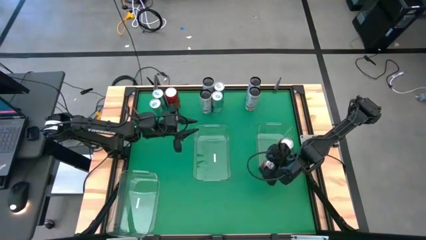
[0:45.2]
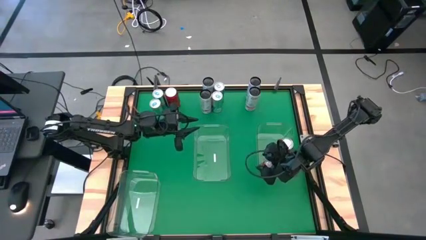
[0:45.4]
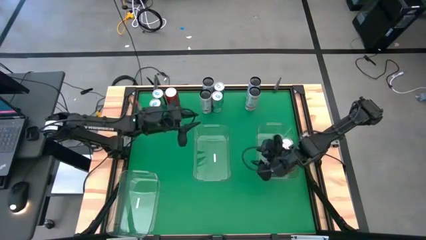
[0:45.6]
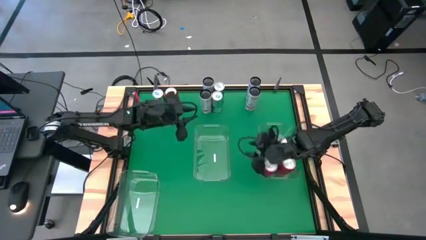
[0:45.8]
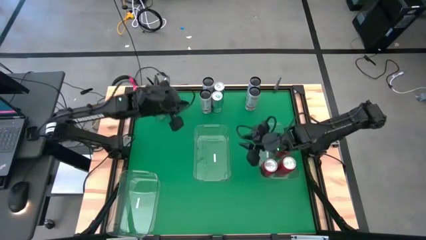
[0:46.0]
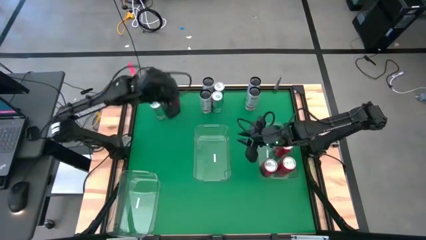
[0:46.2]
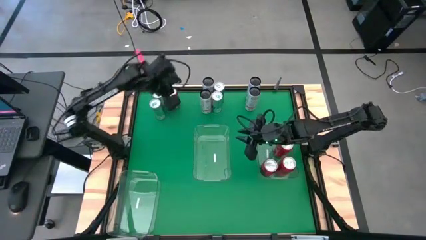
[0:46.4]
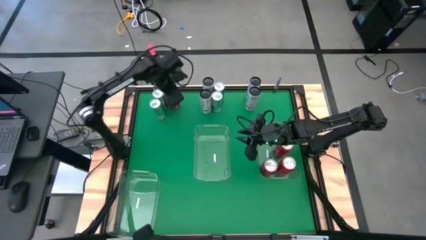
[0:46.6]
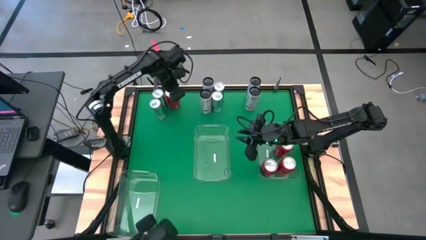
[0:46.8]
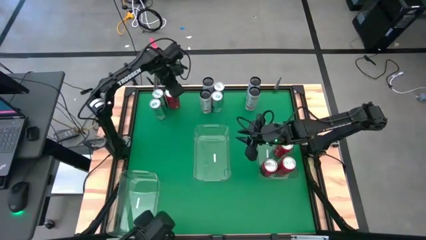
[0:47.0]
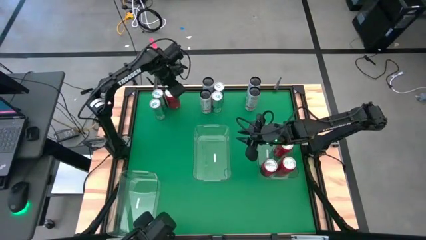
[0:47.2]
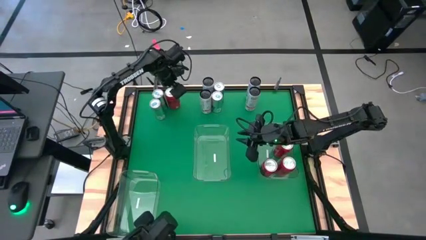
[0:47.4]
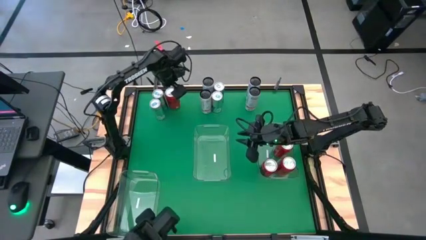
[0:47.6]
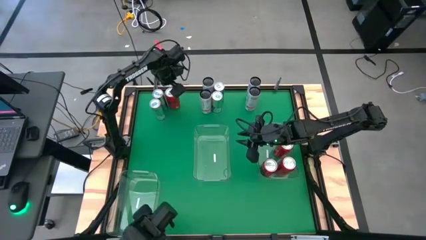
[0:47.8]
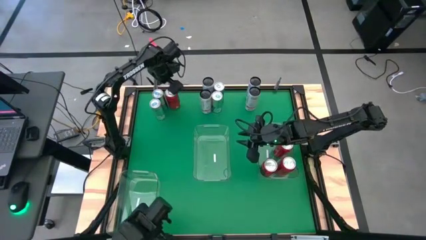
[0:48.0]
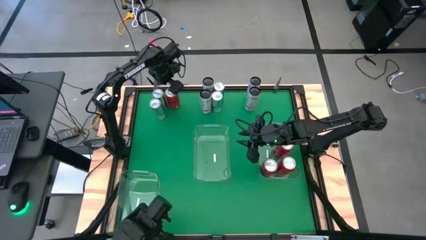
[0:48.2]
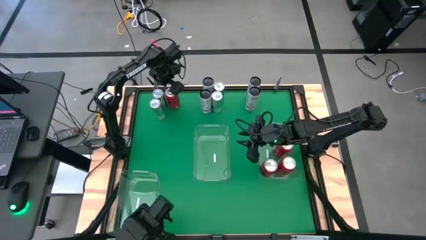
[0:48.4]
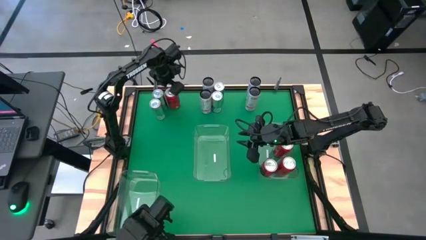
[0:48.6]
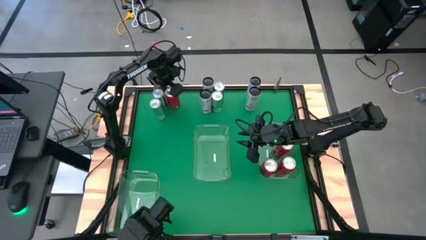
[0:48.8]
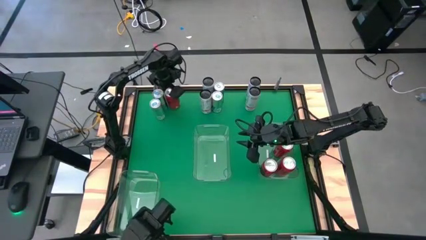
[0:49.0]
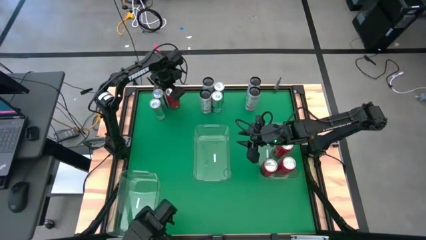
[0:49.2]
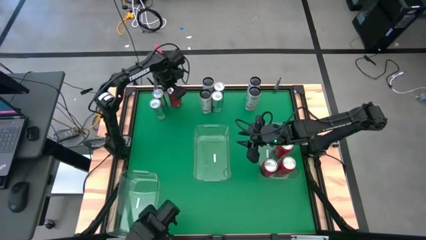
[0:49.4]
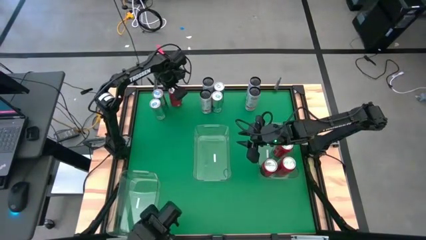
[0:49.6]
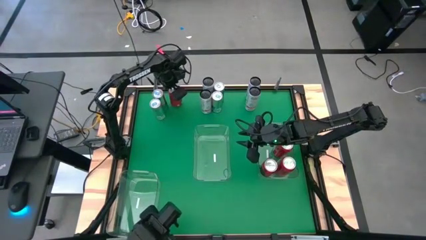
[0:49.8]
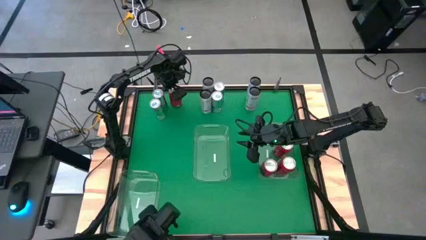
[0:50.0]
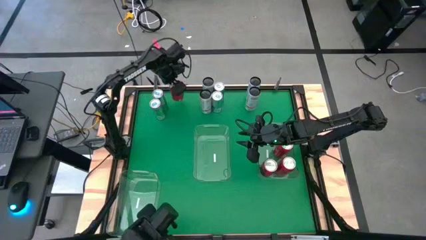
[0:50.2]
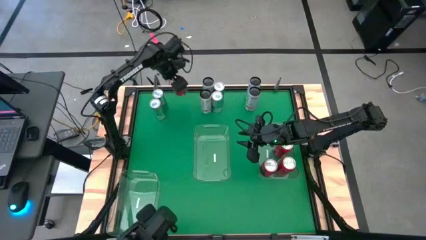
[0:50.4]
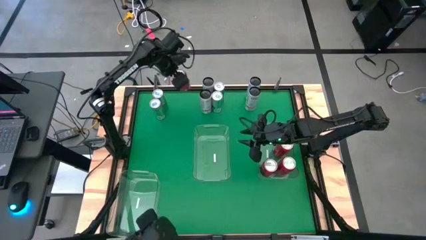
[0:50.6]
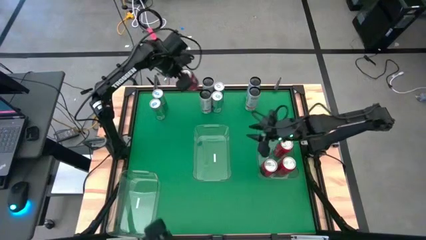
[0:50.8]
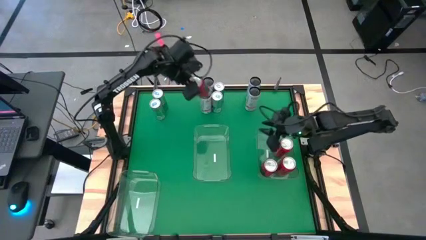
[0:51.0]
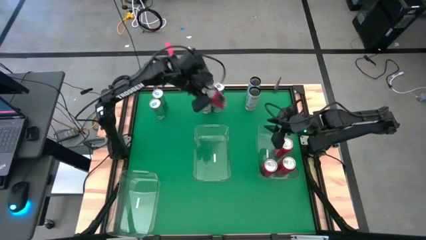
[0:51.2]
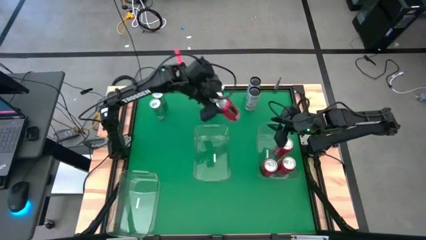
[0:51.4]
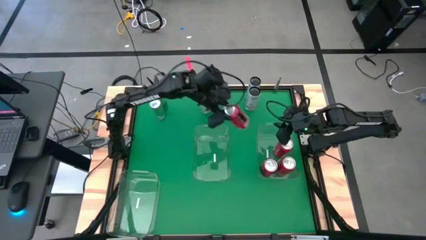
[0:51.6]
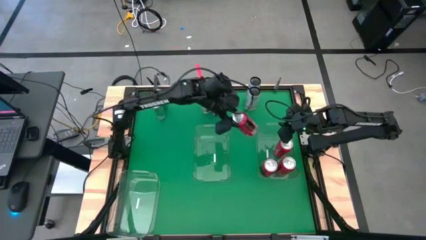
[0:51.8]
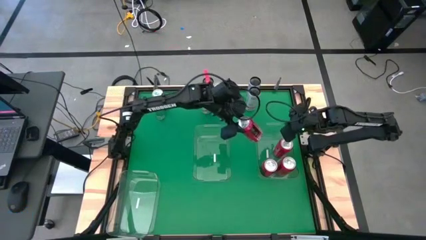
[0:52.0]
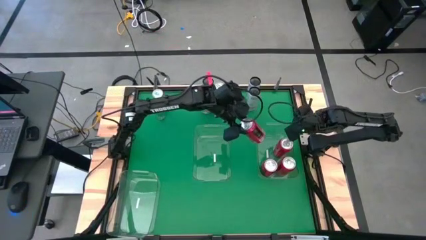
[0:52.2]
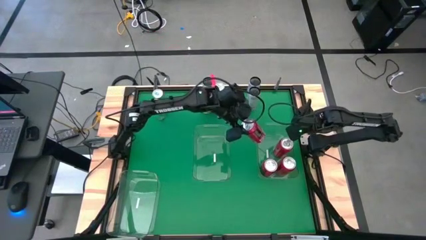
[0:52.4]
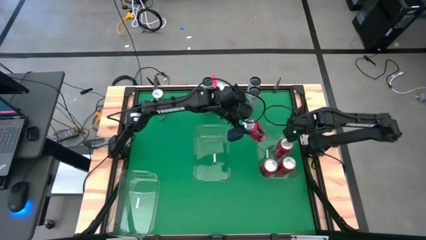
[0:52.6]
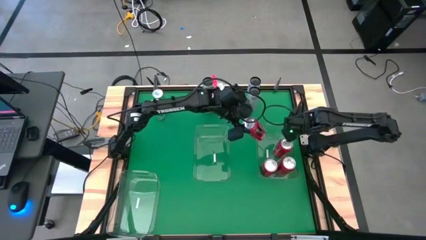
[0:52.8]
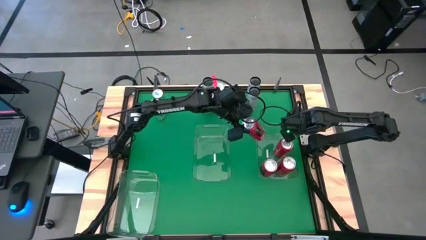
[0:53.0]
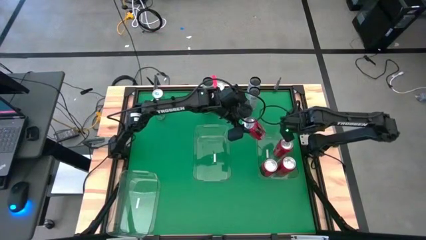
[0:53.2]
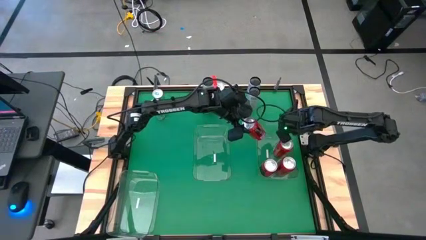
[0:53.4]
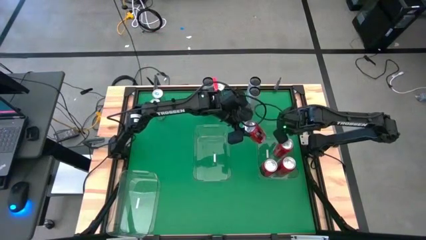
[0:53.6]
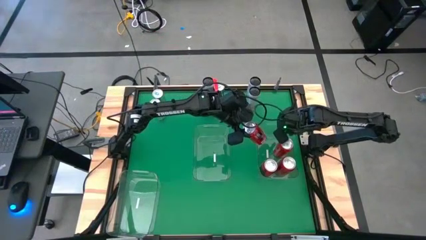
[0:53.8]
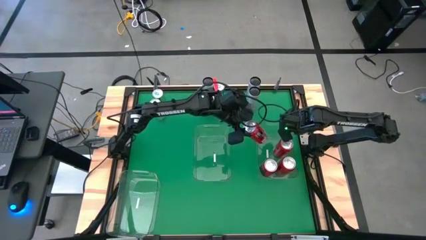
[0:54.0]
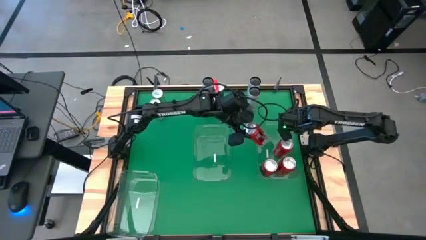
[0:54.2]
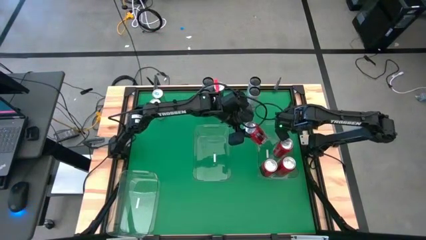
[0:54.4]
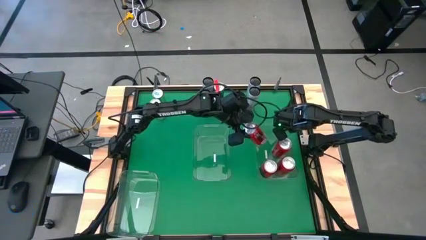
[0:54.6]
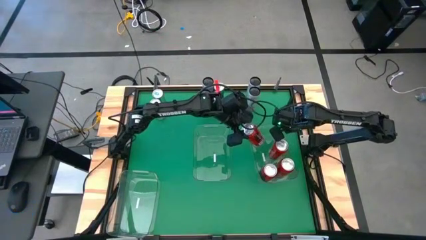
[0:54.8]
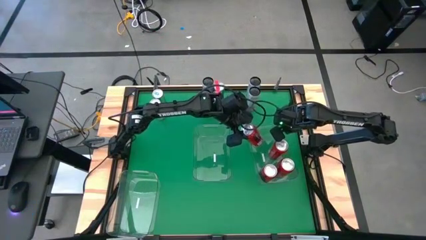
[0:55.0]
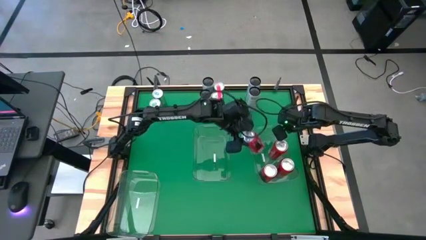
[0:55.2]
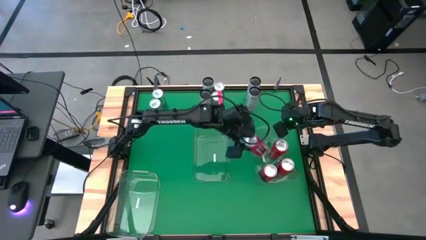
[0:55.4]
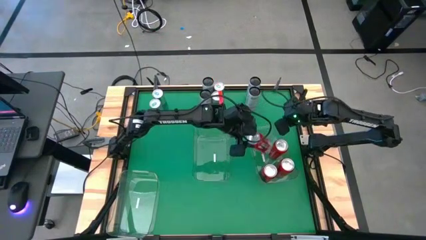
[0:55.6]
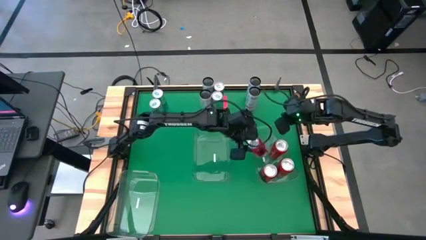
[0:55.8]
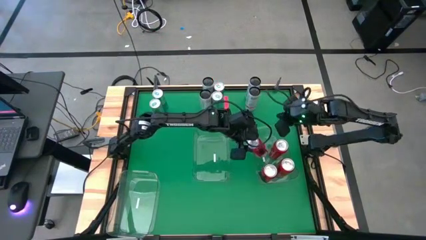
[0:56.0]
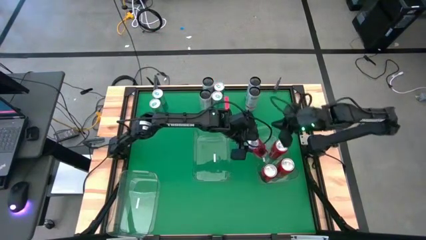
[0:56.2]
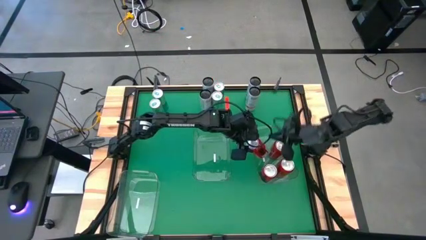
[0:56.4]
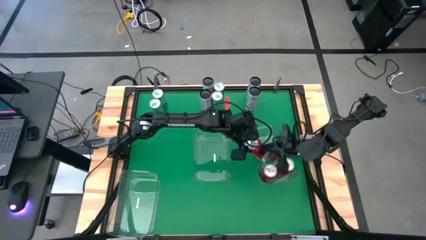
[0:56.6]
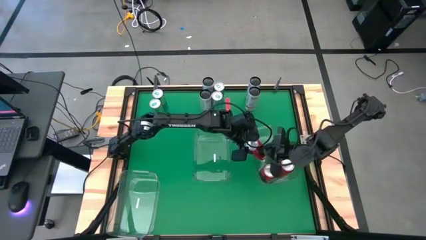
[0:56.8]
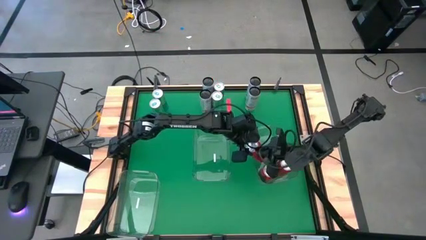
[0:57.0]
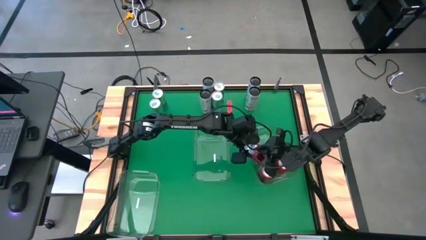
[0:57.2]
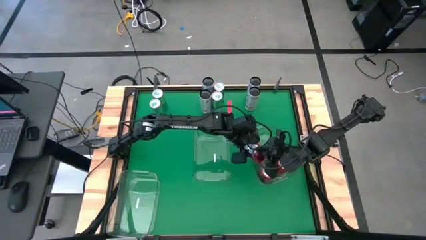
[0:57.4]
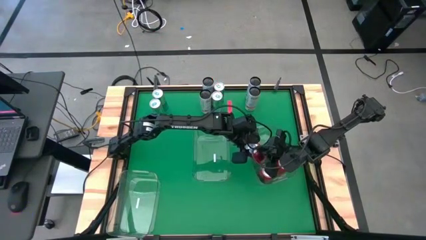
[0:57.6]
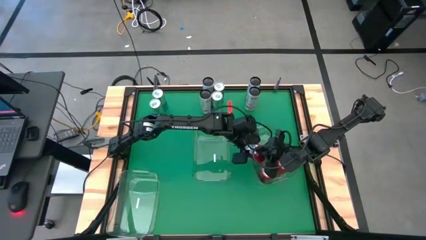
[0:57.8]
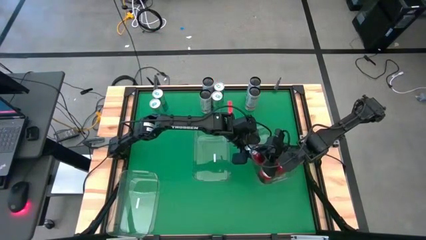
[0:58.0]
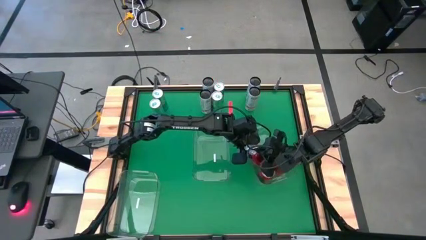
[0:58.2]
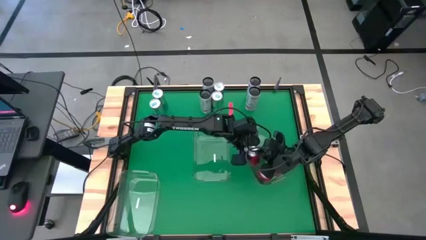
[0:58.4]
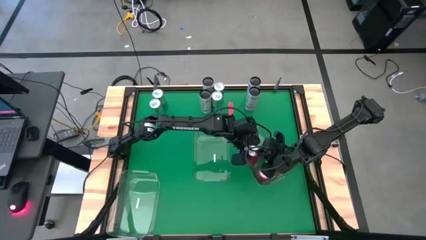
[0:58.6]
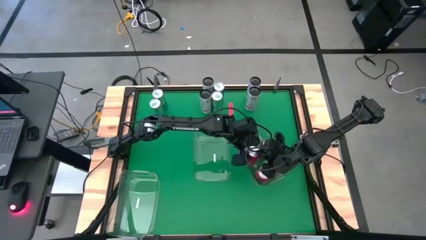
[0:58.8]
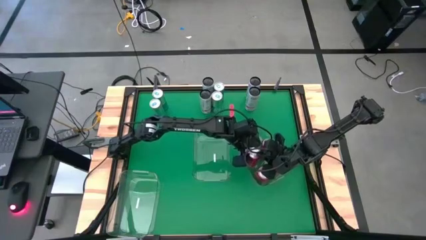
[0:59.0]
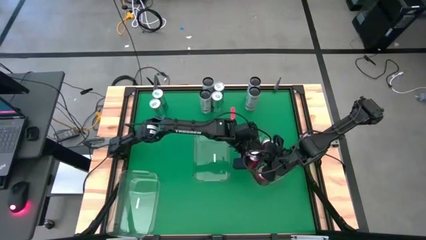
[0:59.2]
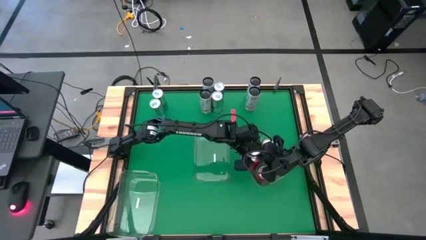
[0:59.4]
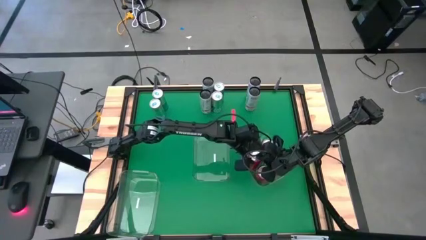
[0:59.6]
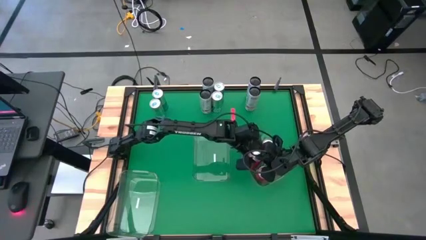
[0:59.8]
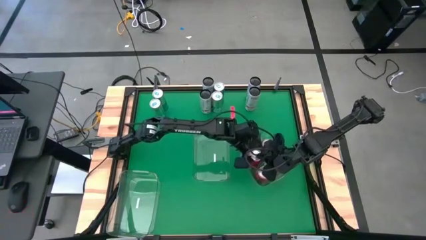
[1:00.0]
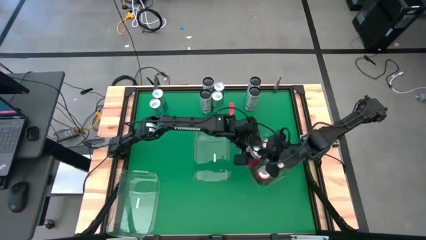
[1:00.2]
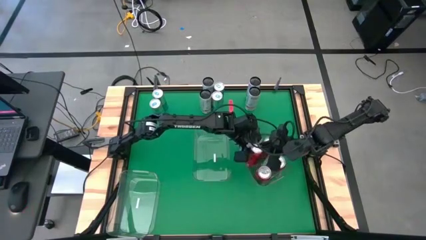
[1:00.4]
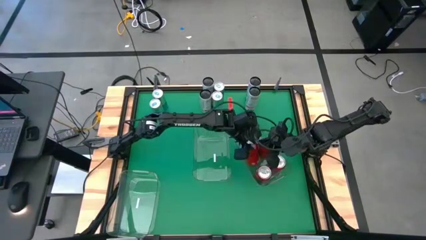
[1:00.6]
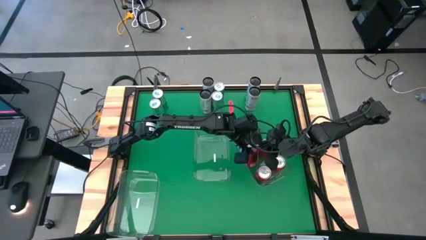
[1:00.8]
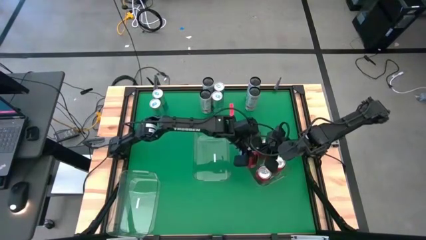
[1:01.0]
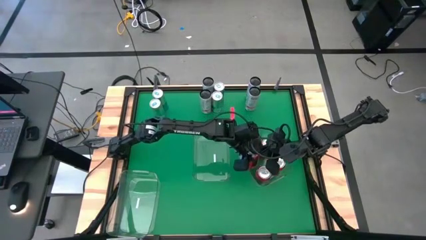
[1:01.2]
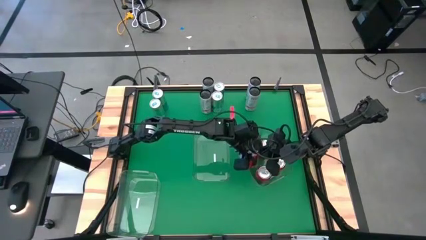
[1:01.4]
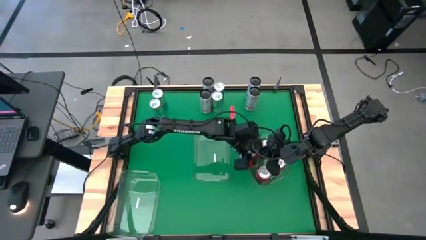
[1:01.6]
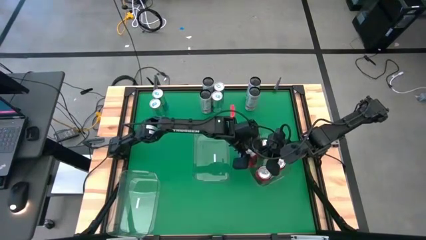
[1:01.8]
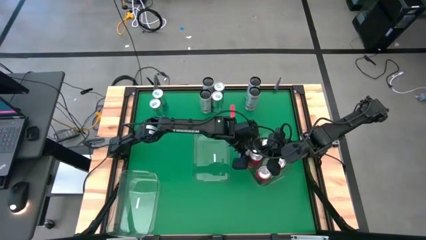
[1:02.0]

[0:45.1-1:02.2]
Task: Sort soda cans
Put the red-black soda can into the top right transparent bin
